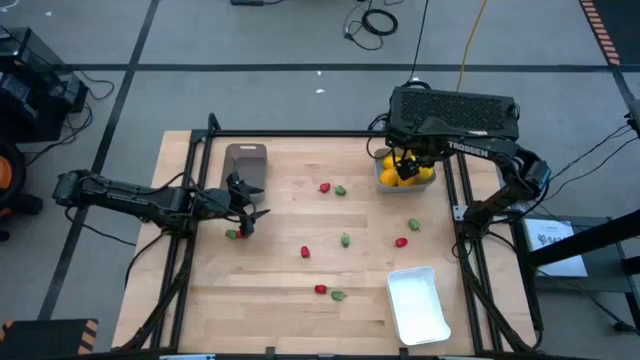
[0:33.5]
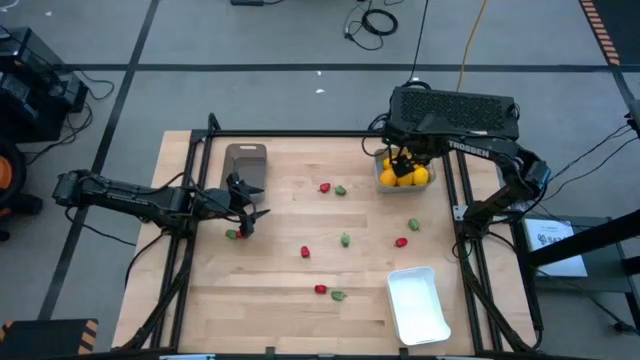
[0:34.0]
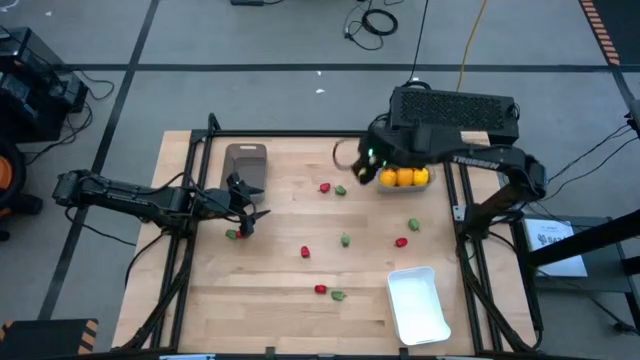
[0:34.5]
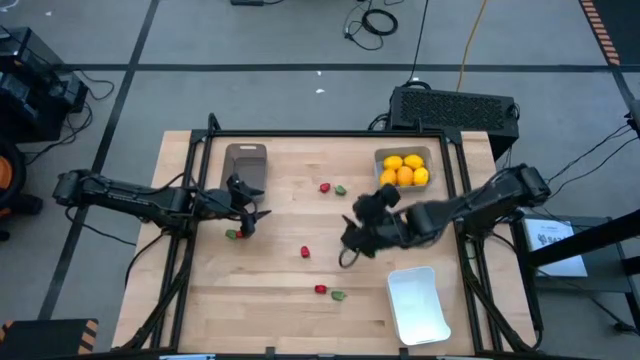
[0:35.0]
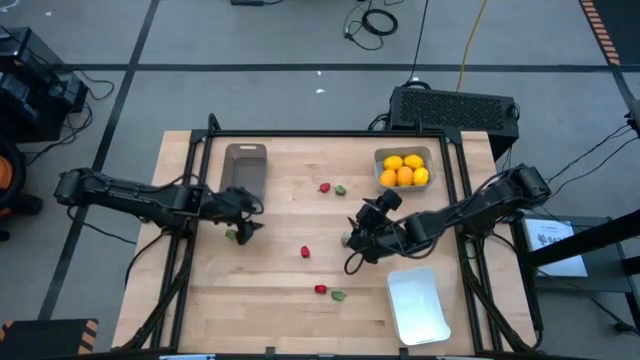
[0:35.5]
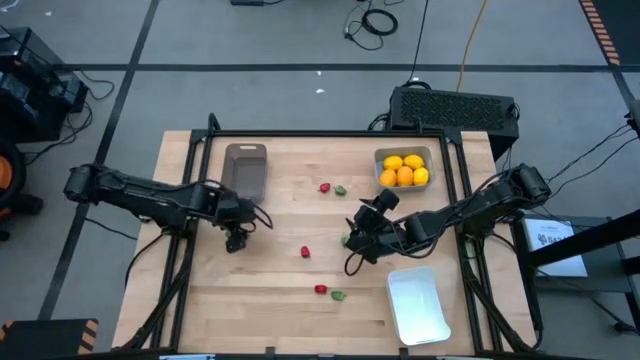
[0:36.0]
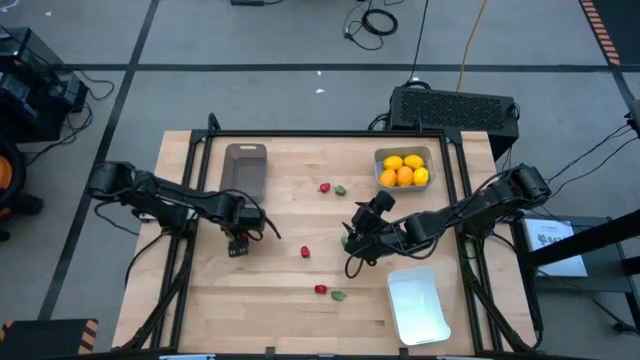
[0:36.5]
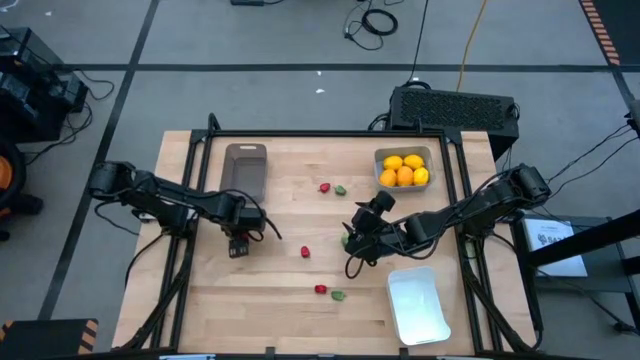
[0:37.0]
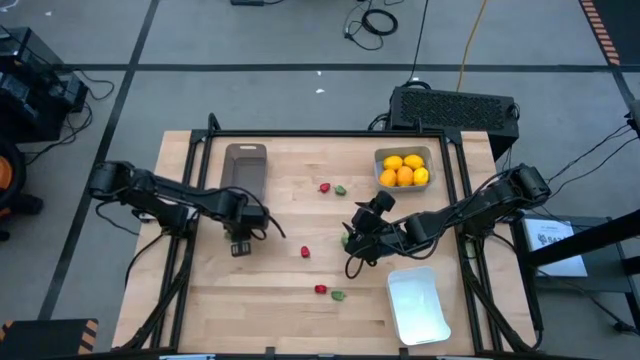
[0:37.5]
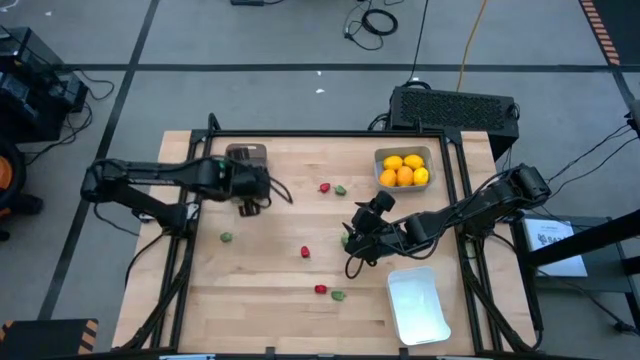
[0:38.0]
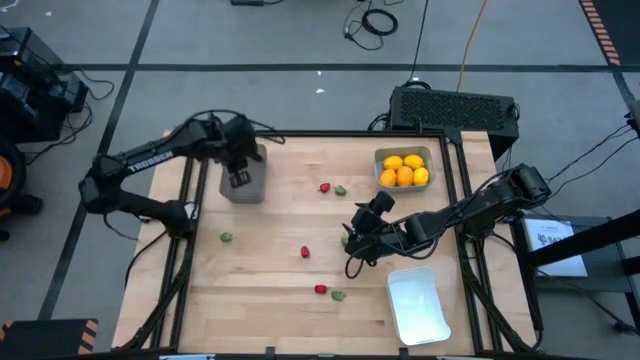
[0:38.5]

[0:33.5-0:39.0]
Task: Sort produce into baskets
Put the middle left red chili pepper into the black bin

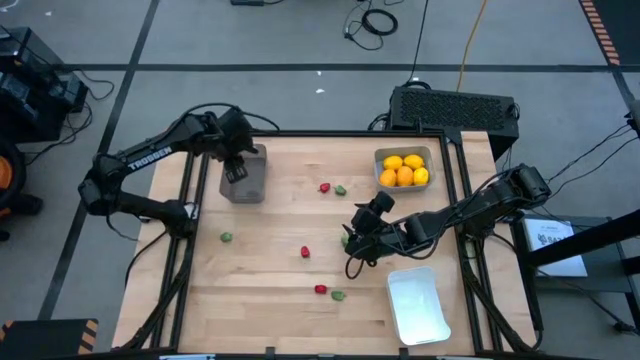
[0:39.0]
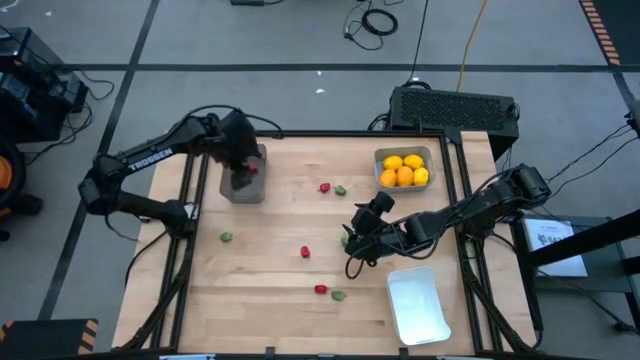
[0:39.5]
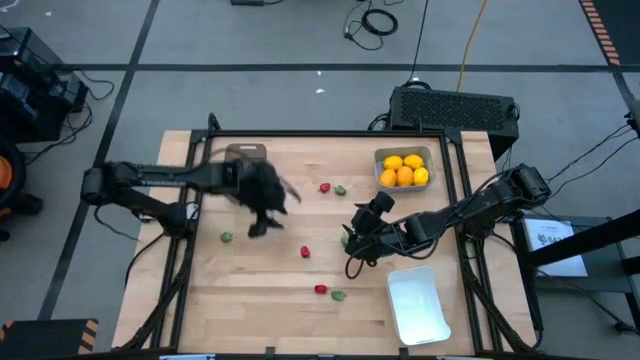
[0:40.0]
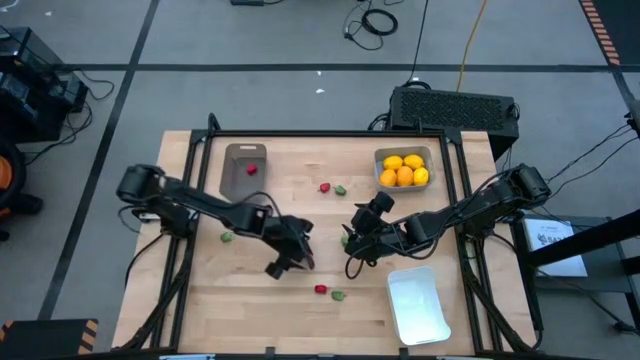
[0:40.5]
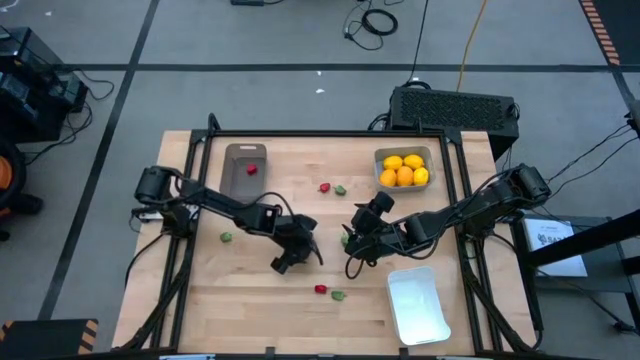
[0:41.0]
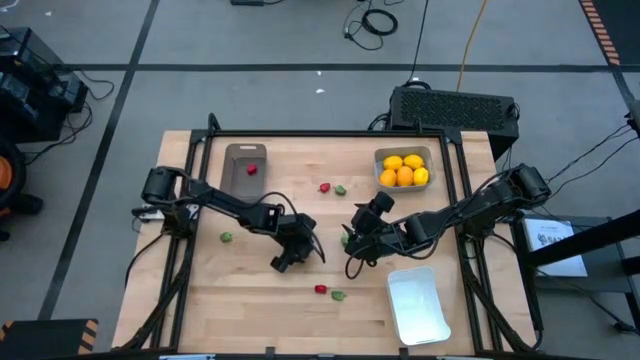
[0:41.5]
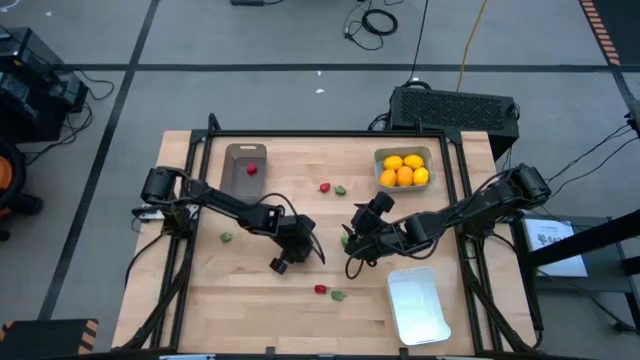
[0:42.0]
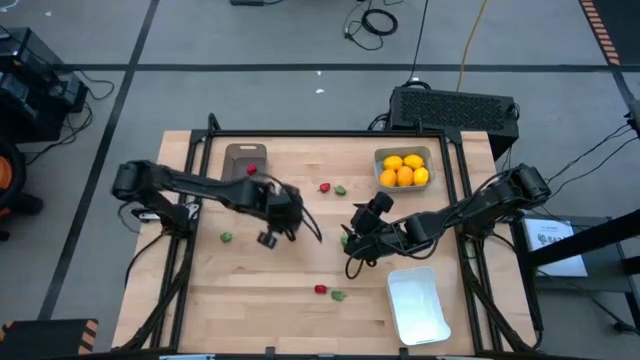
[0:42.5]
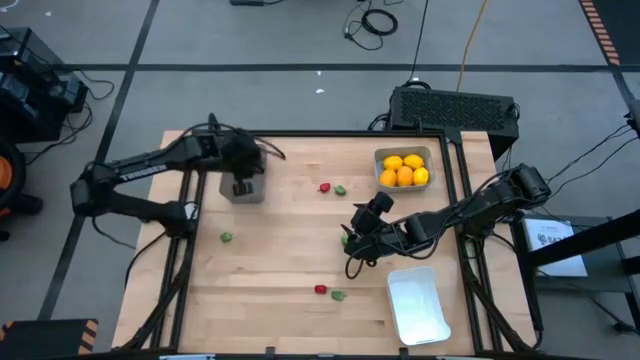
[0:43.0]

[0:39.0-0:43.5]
Put the center red chili pepper into the black bin

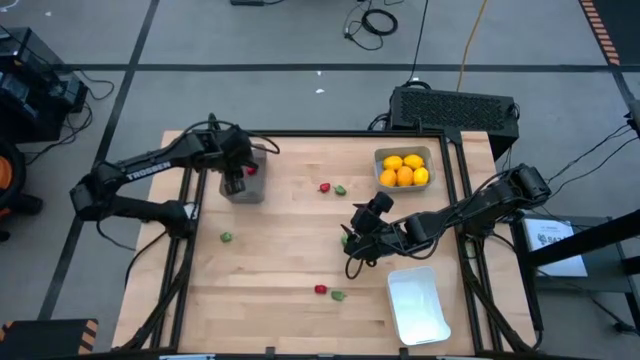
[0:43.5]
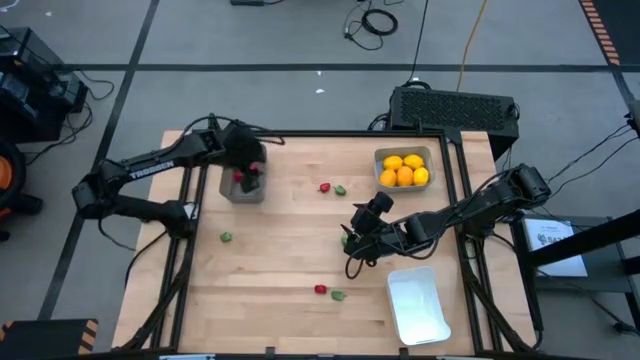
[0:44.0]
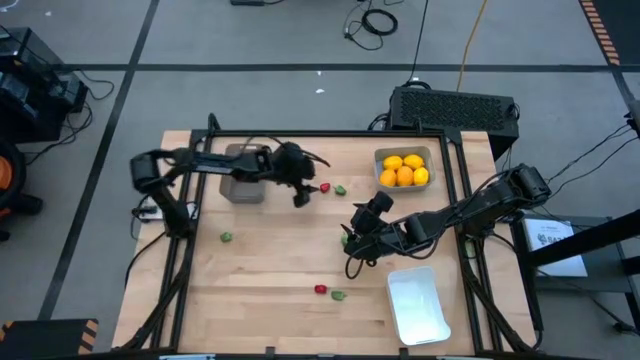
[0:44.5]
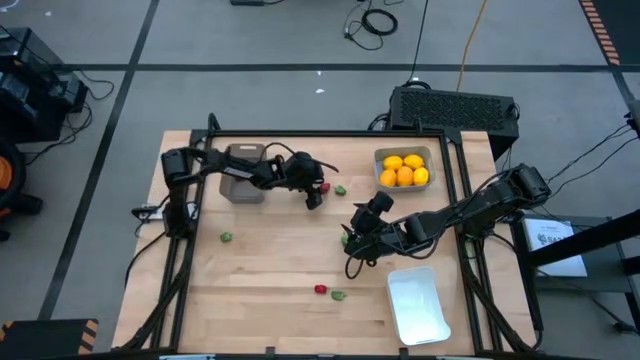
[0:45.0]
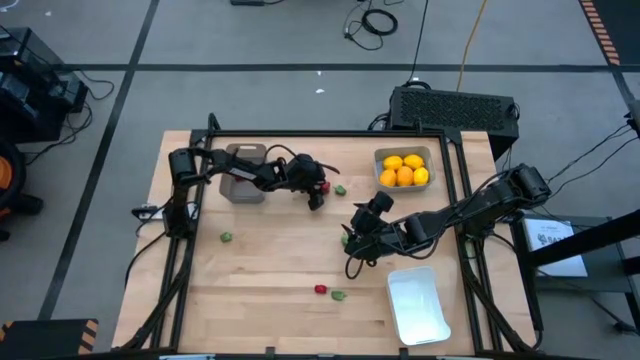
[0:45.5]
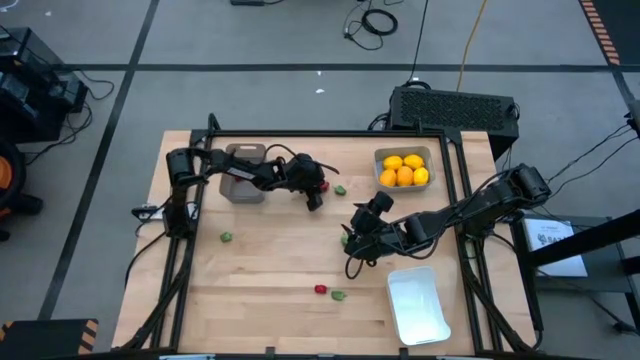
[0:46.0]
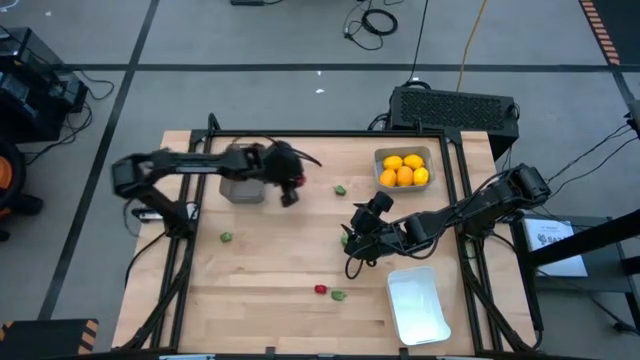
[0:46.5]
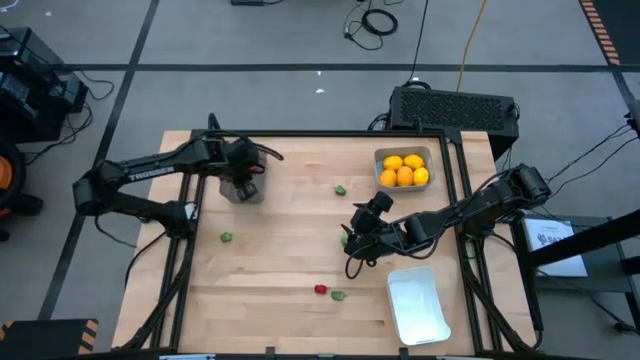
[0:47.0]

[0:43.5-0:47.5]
Put the center top red chili pepper into the black bin

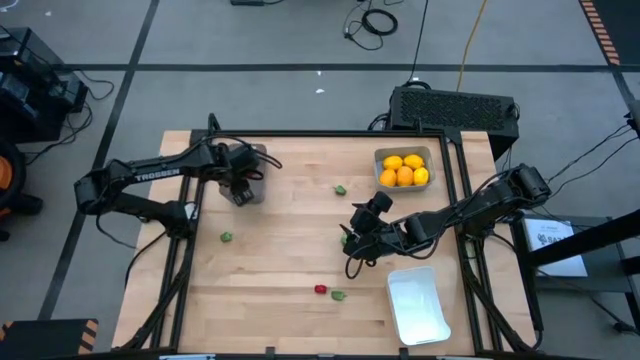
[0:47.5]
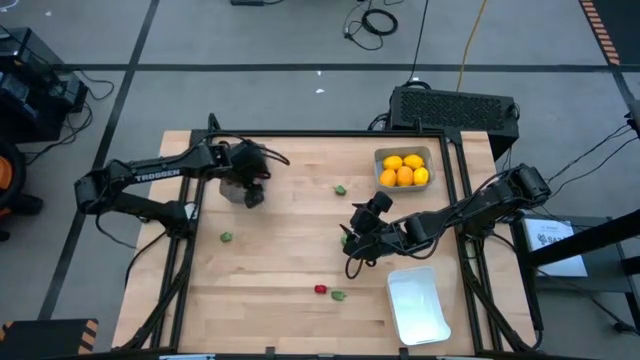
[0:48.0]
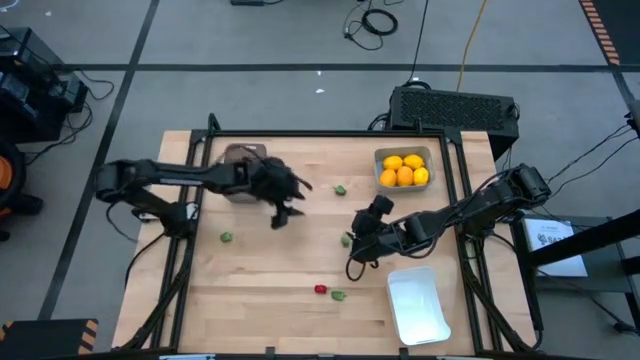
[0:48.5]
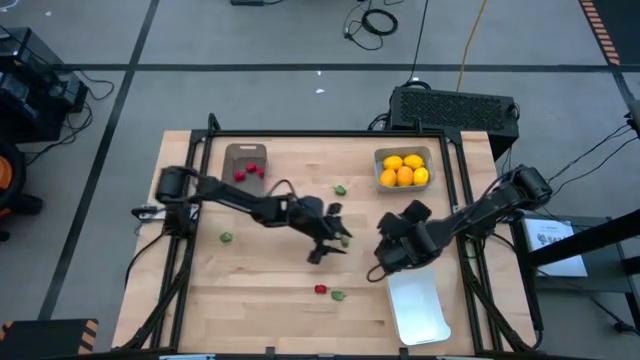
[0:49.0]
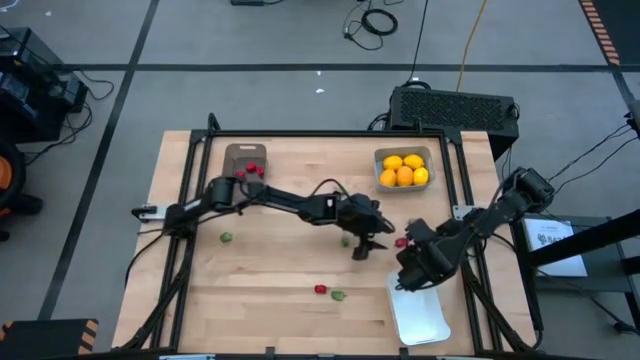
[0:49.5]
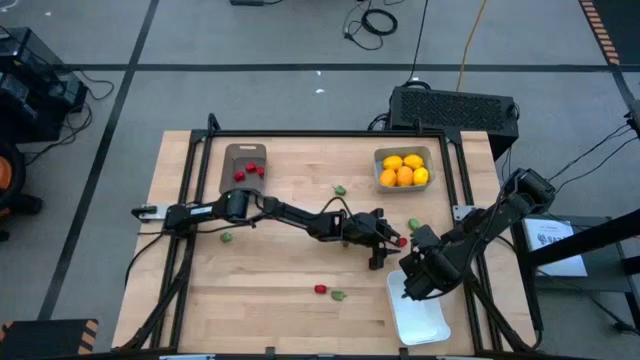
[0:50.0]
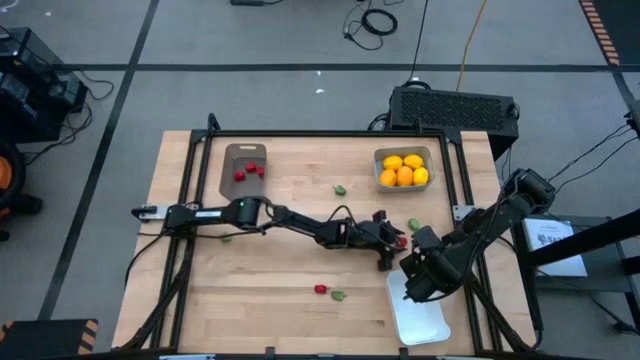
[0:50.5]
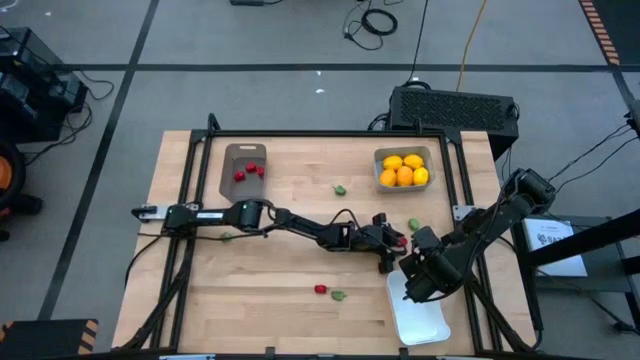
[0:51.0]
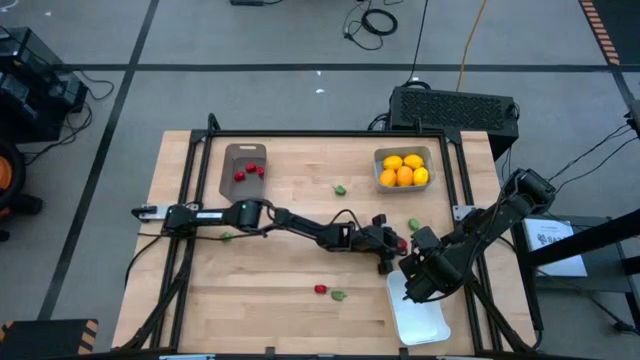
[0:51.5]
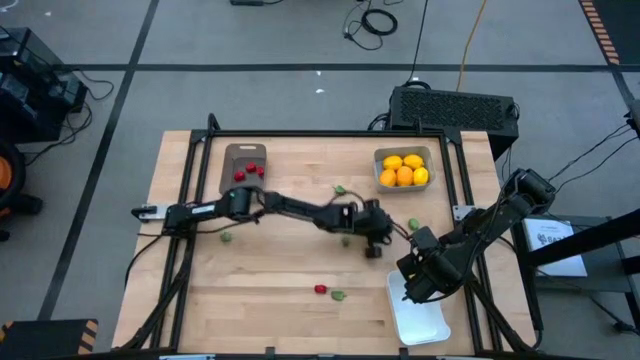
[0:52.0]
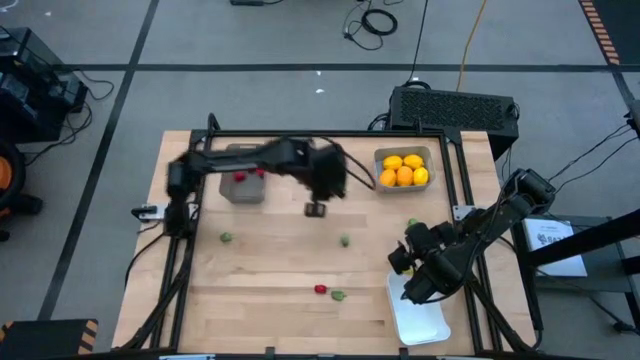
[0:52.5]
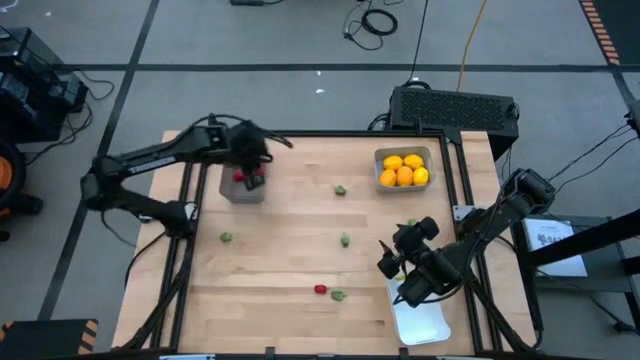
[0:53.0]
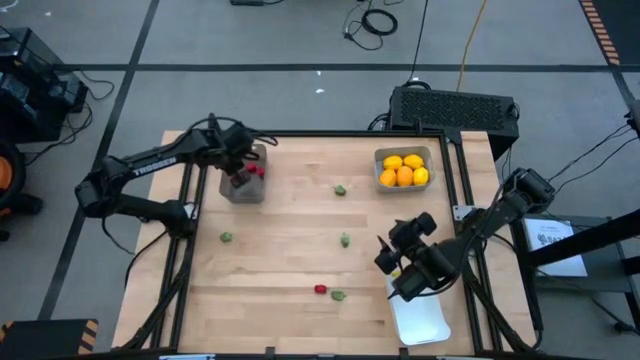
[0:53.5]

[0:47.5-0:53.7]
Put the top red chili pepper into the black bin
